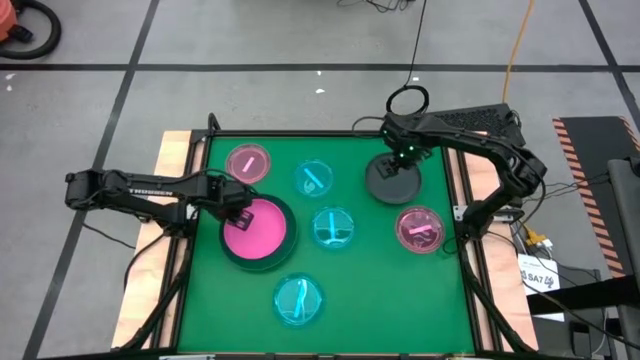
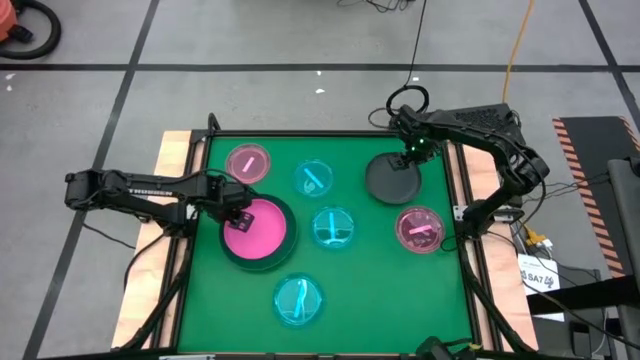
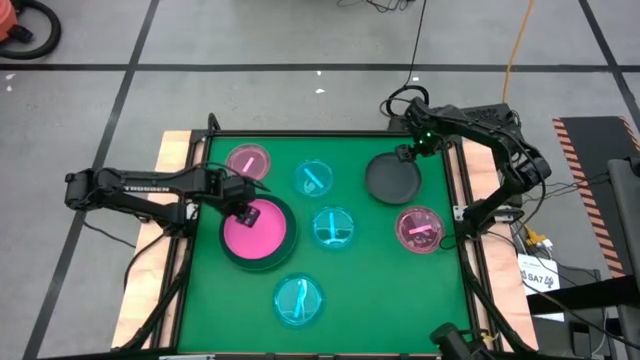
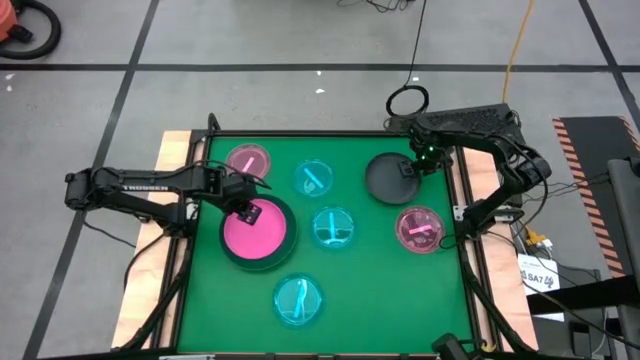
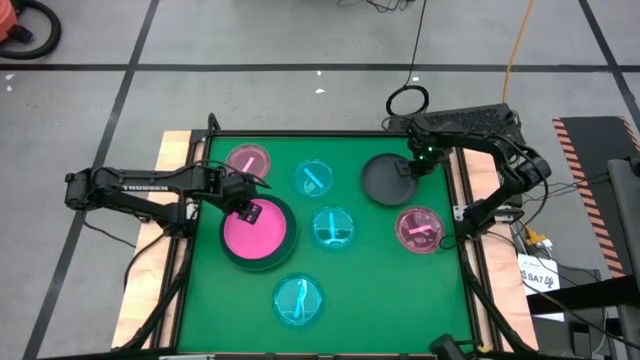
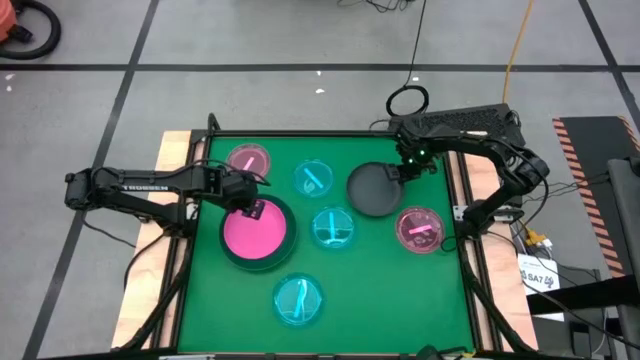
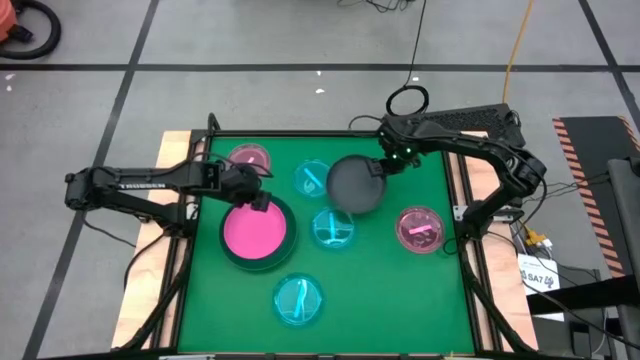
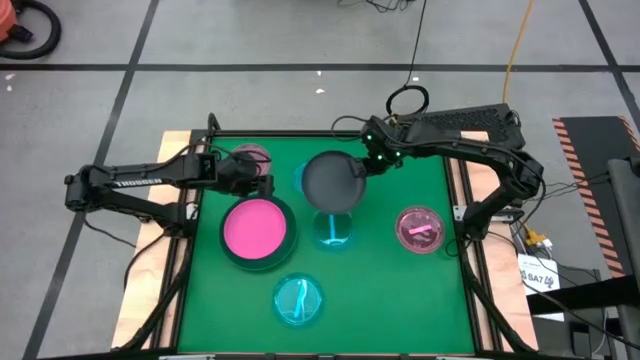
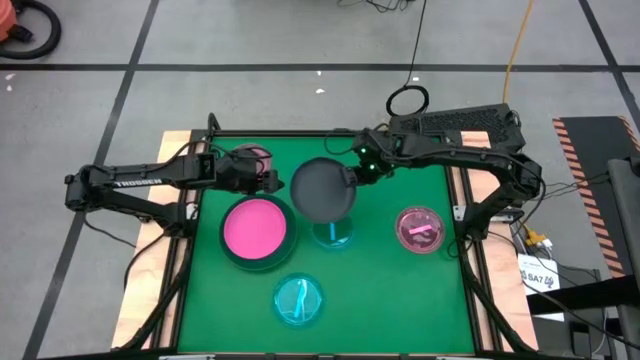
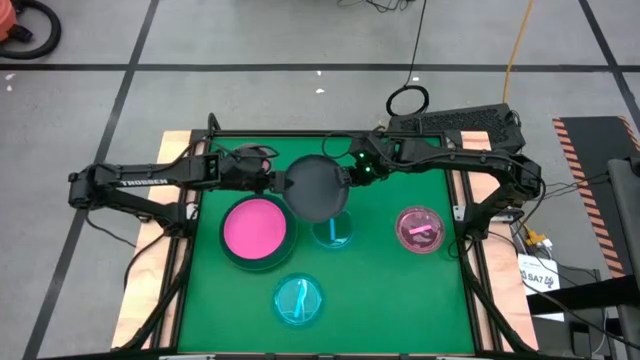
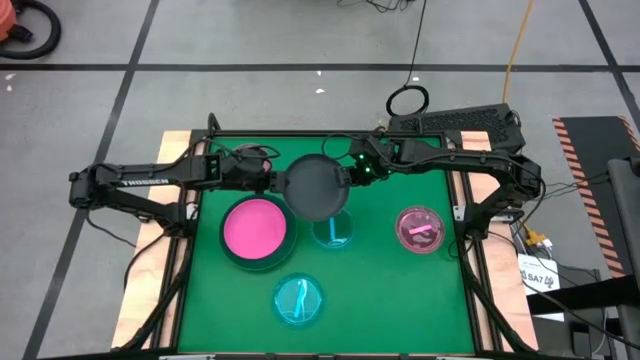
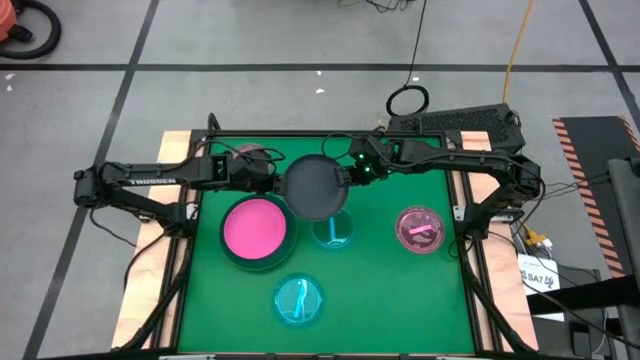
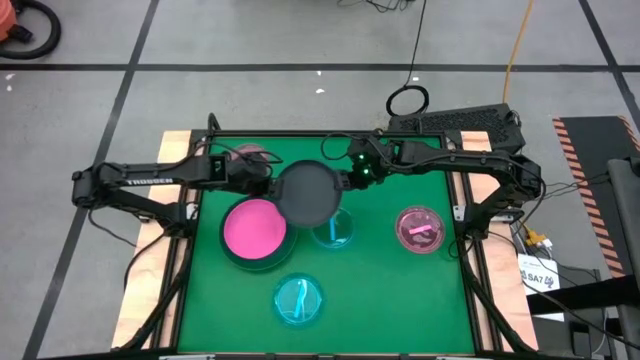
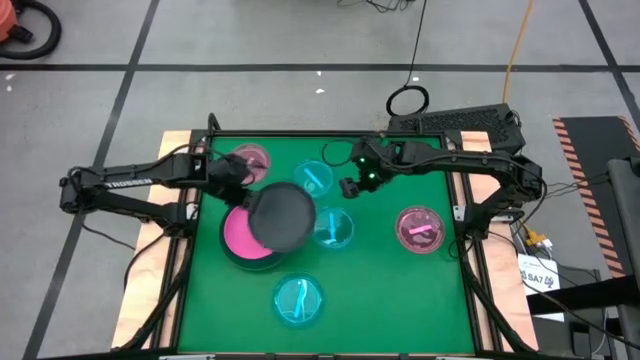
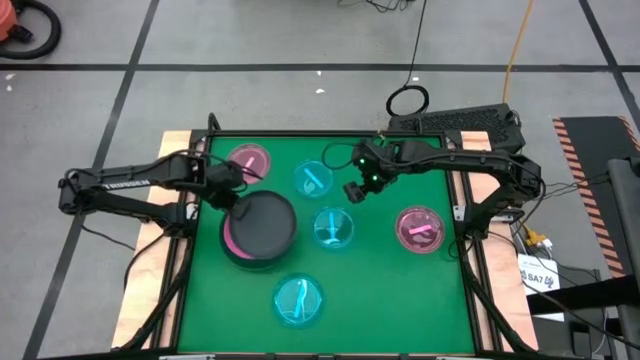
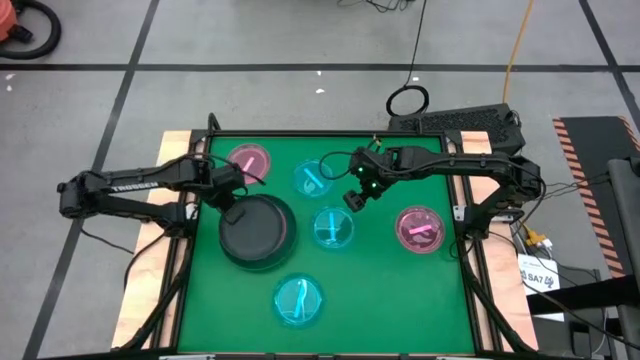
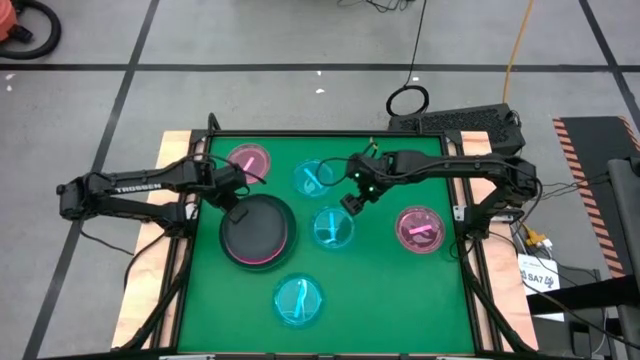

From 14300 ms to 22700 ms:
Task: Stack plastic plates
Stack the black plate on top of the pink plate

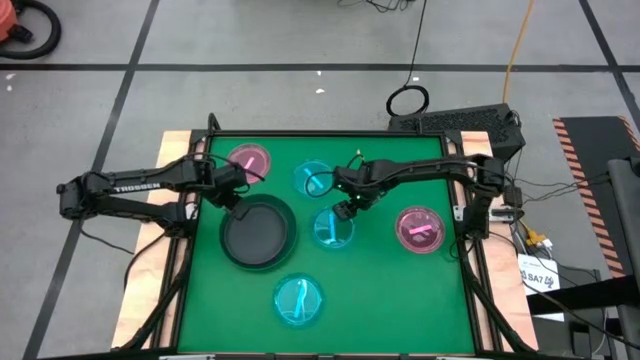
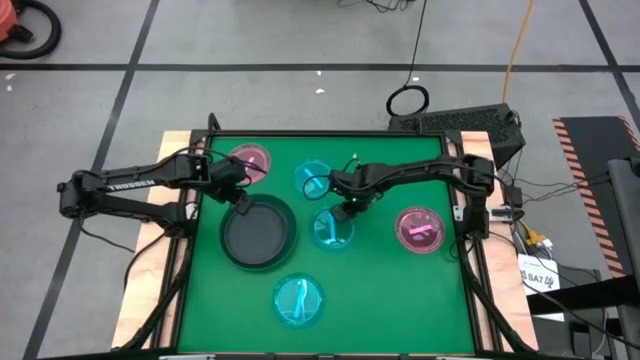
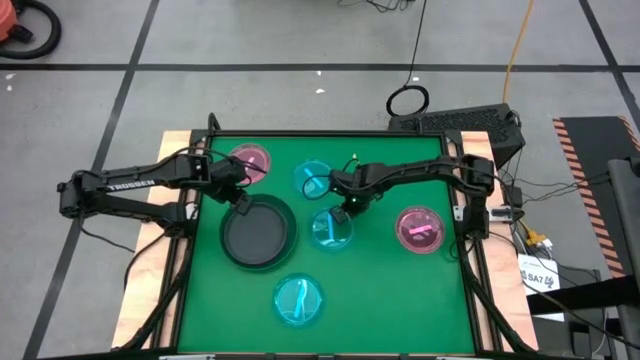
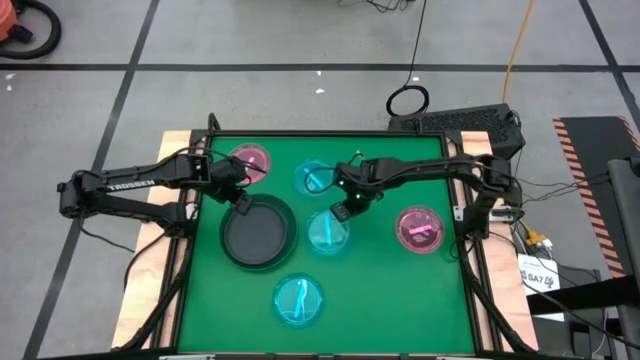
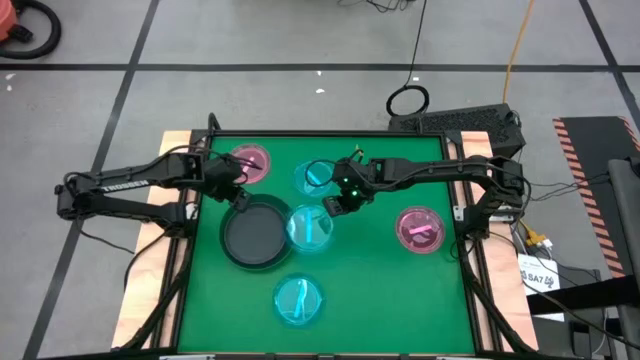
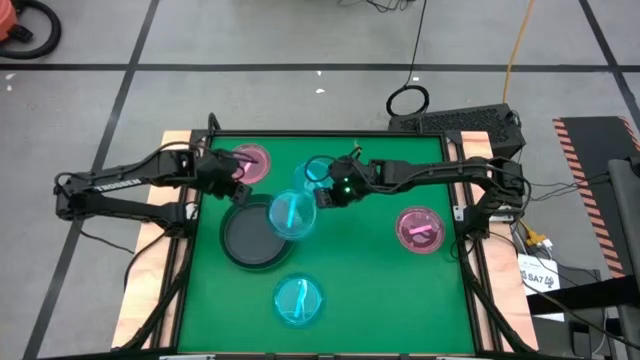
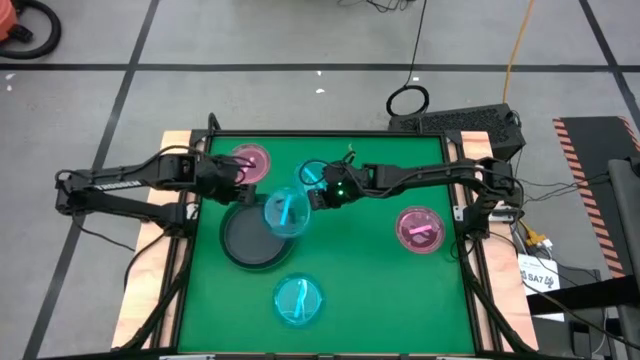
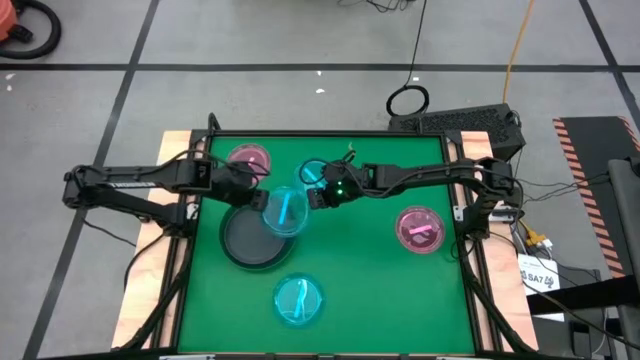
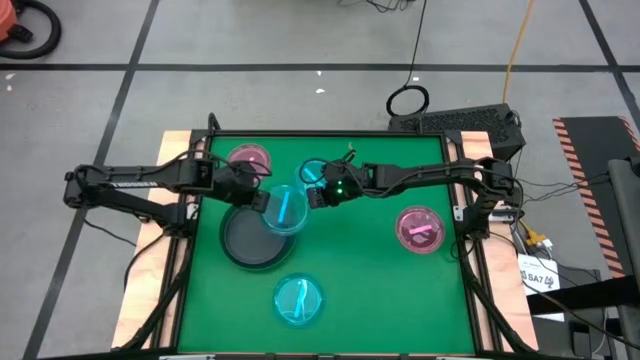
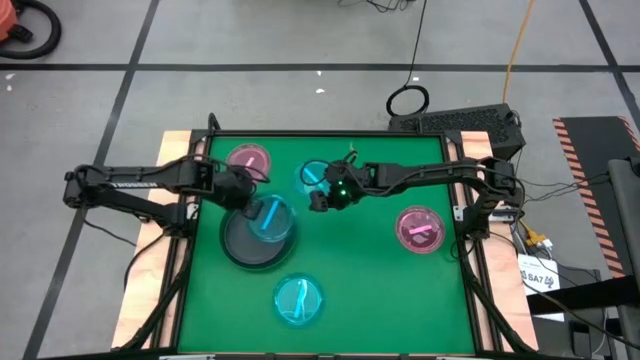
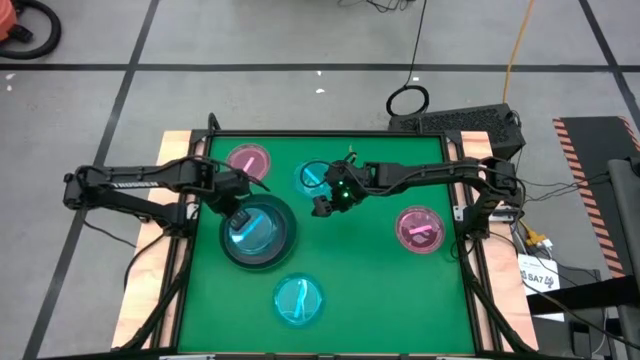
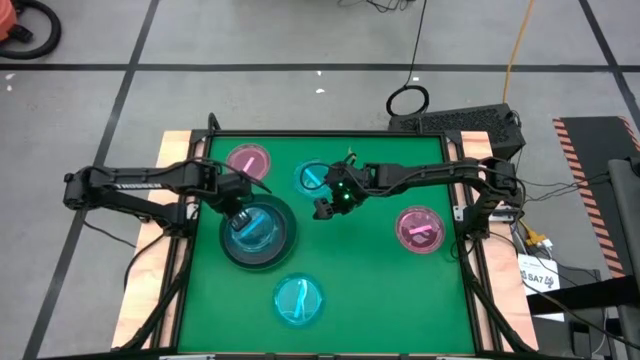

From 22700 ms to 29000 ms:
Stack the middle transparent blue plate on top of the black plate

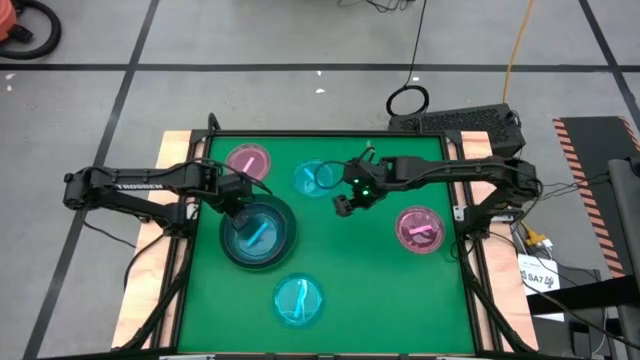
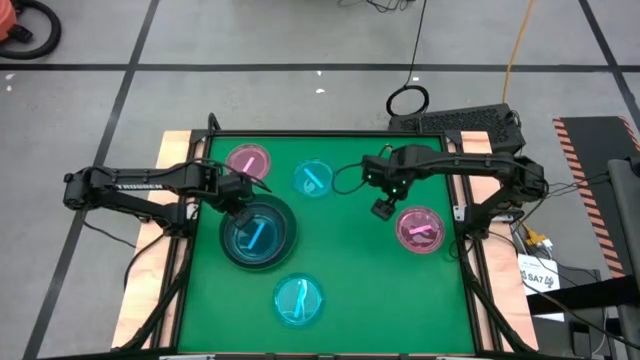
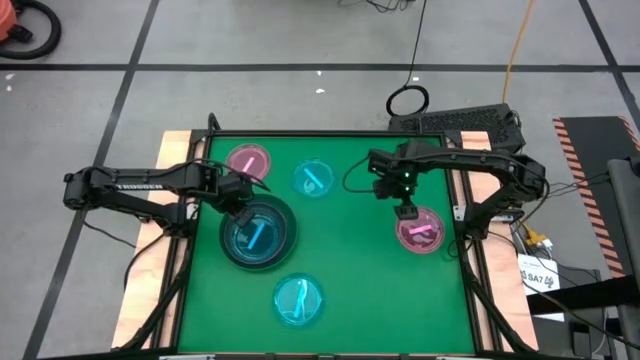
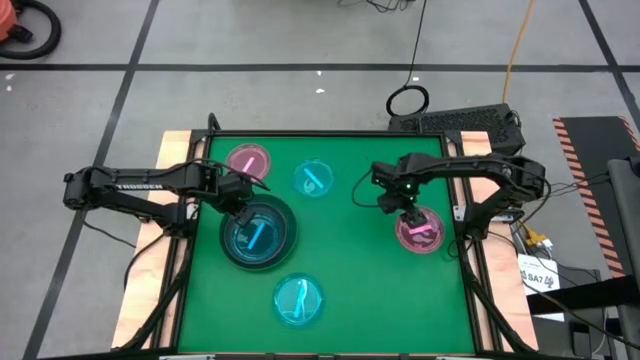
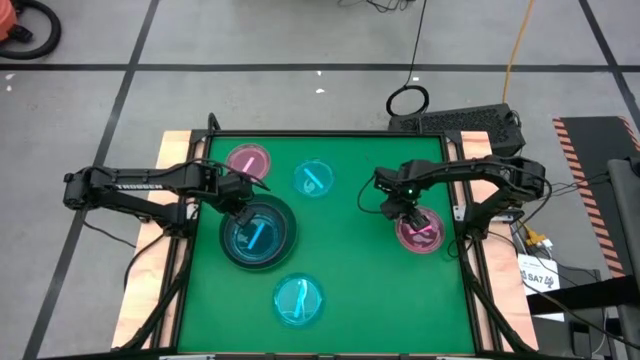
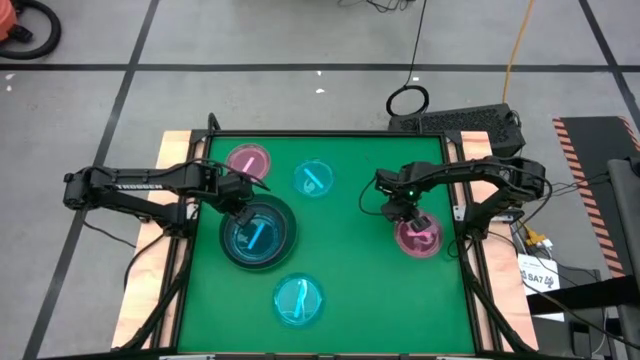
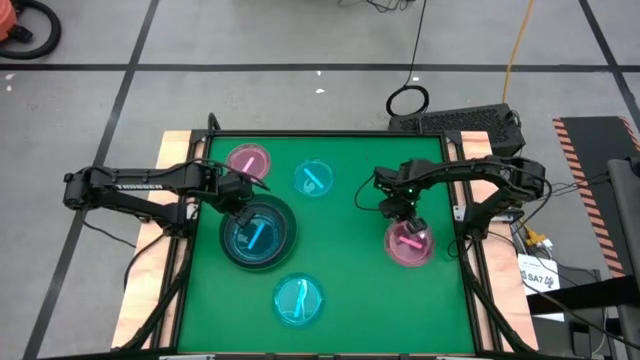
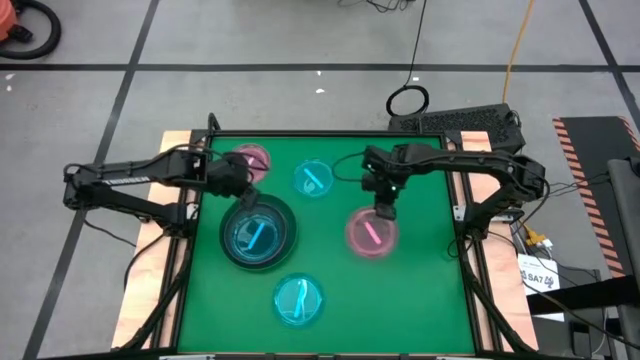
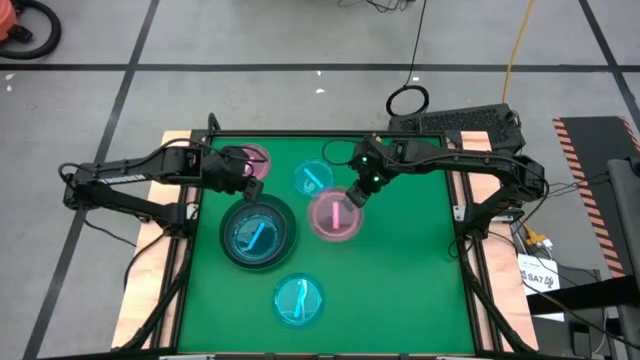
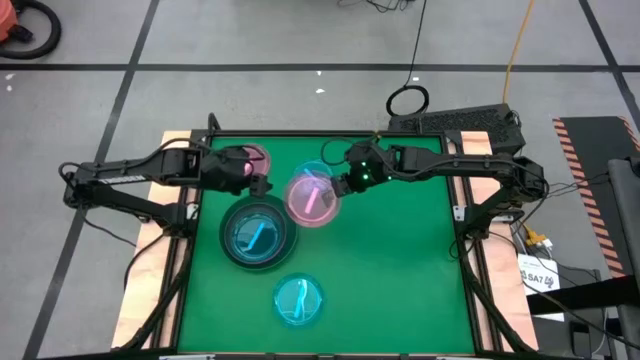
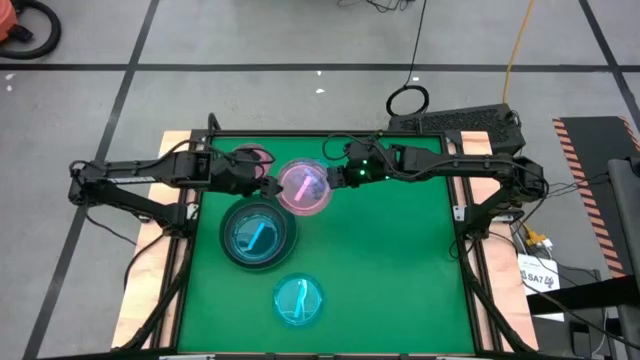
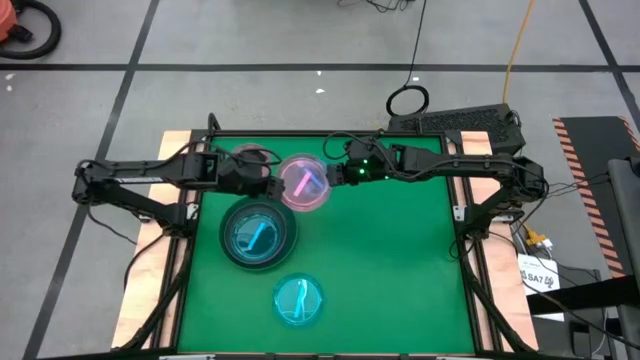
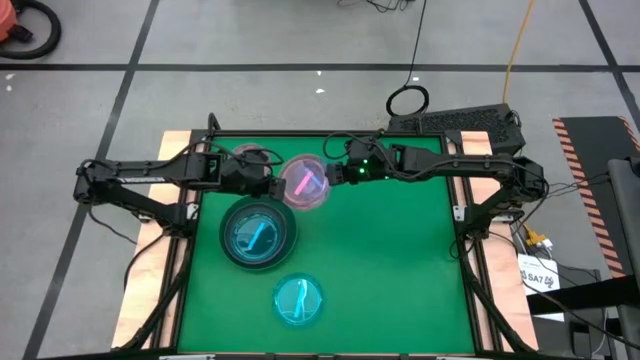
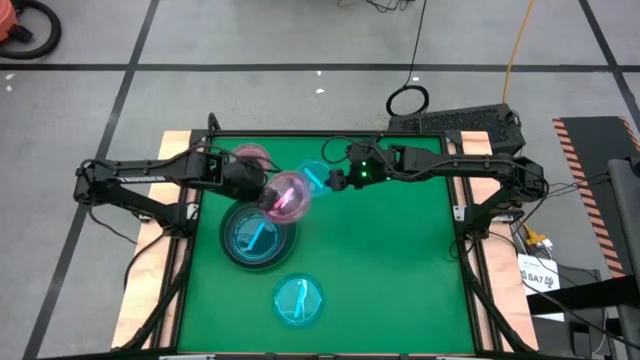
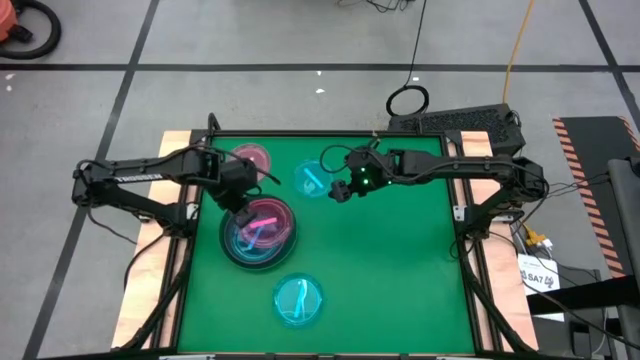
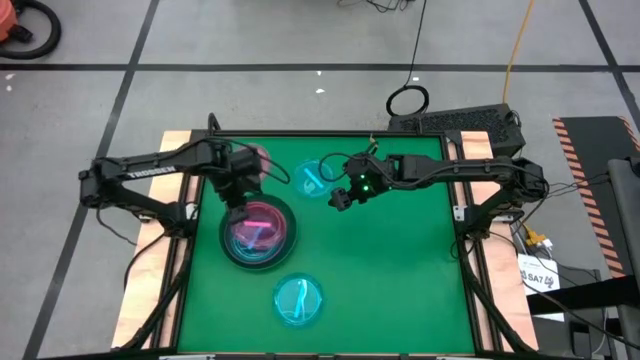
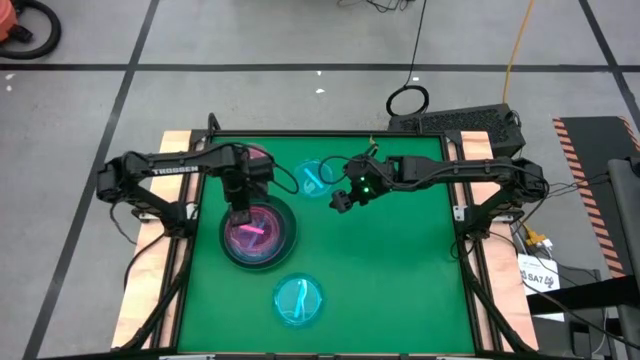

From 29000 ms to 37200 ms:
Stack the right transparent pink plate on top of the transparent blue plate
